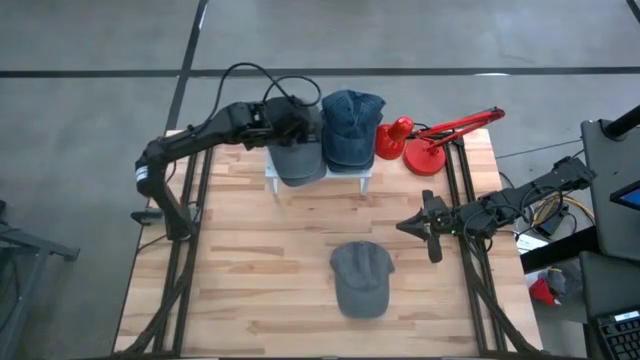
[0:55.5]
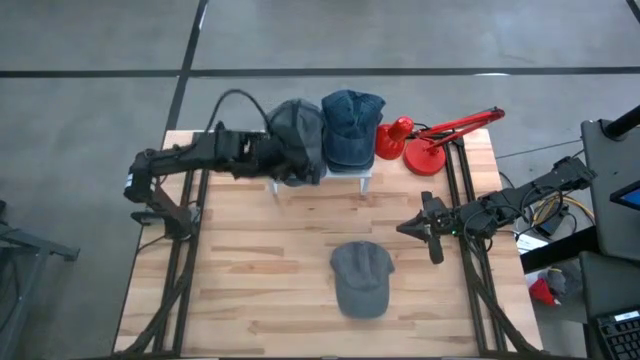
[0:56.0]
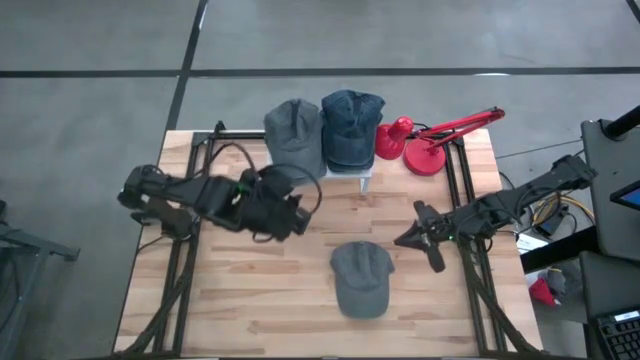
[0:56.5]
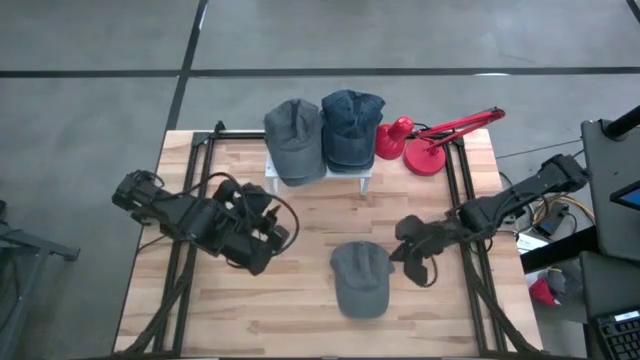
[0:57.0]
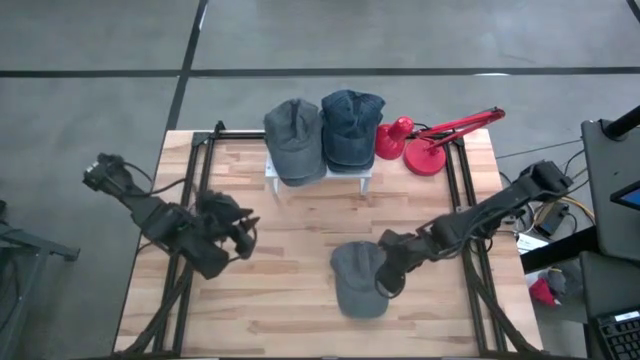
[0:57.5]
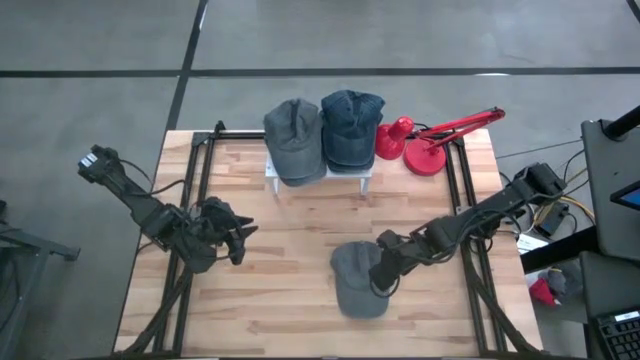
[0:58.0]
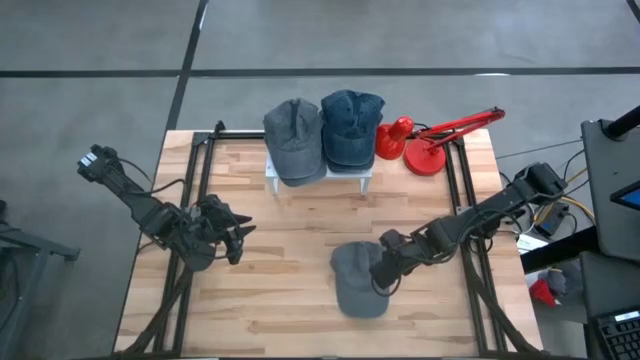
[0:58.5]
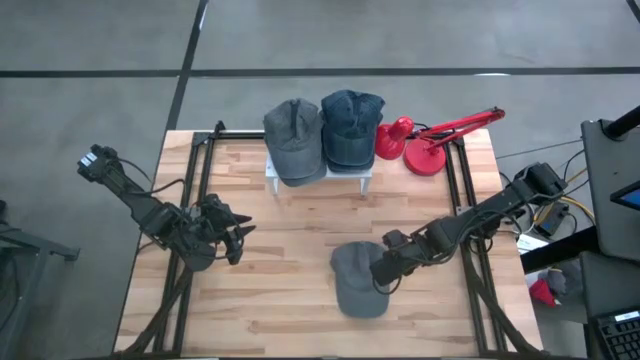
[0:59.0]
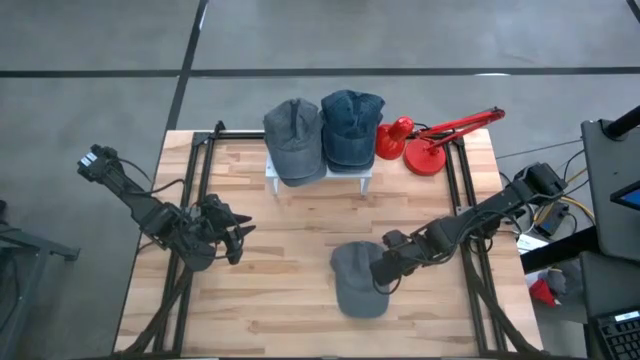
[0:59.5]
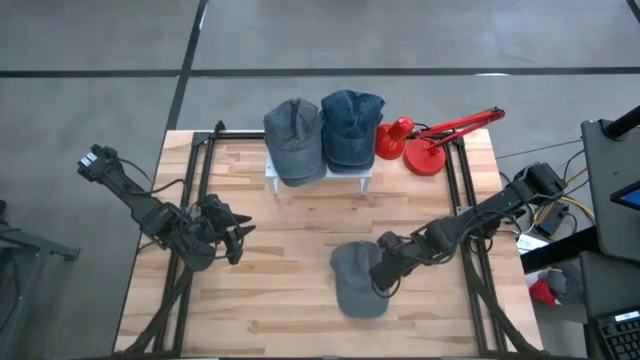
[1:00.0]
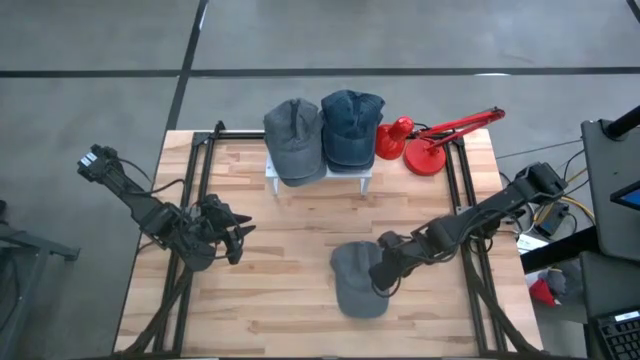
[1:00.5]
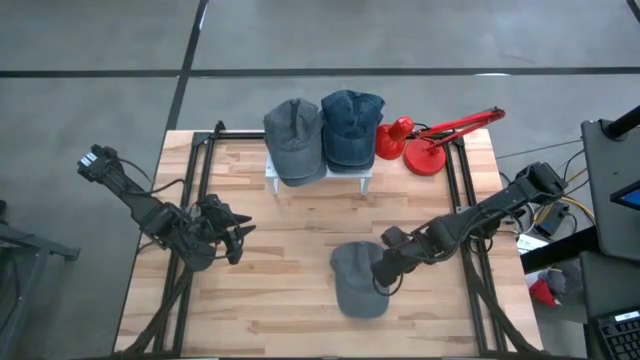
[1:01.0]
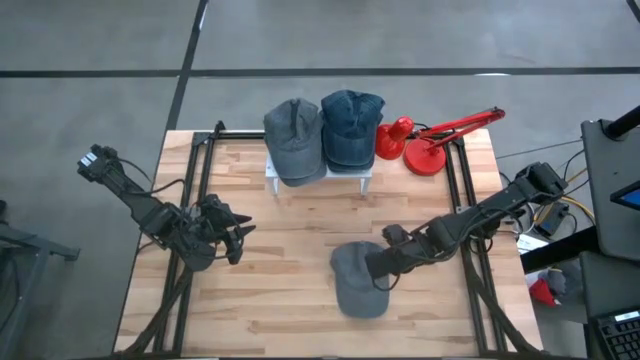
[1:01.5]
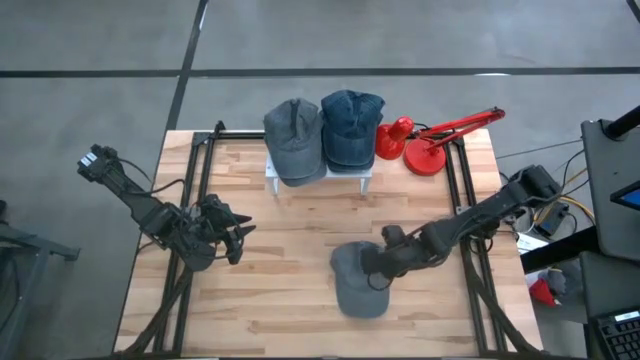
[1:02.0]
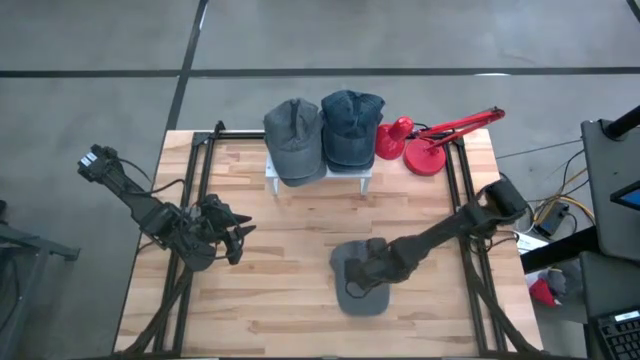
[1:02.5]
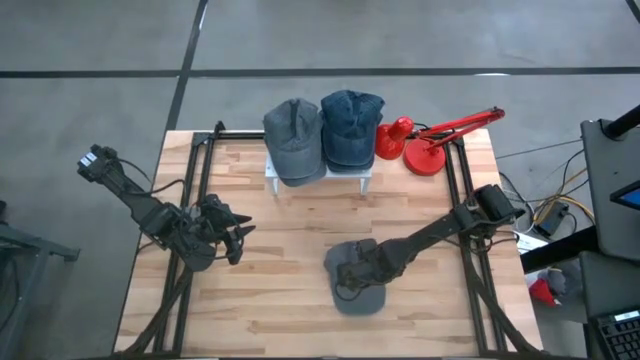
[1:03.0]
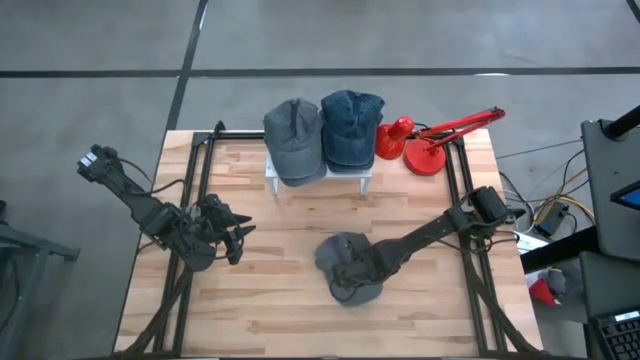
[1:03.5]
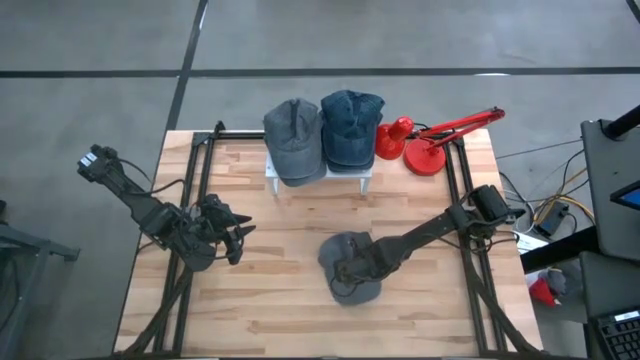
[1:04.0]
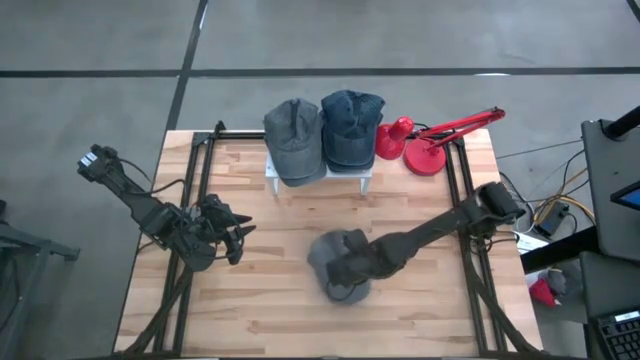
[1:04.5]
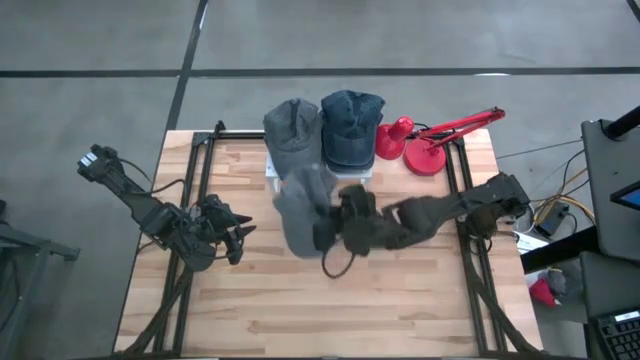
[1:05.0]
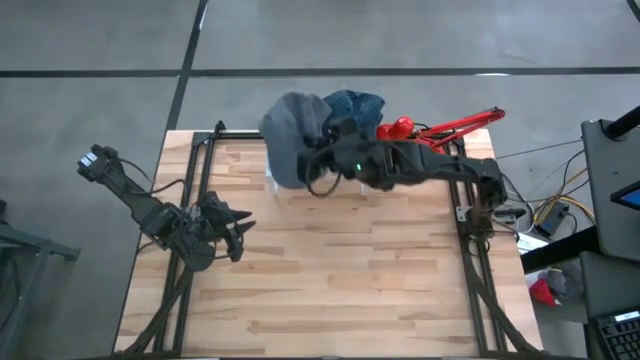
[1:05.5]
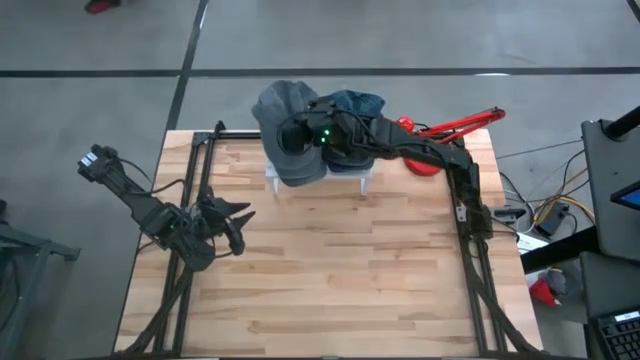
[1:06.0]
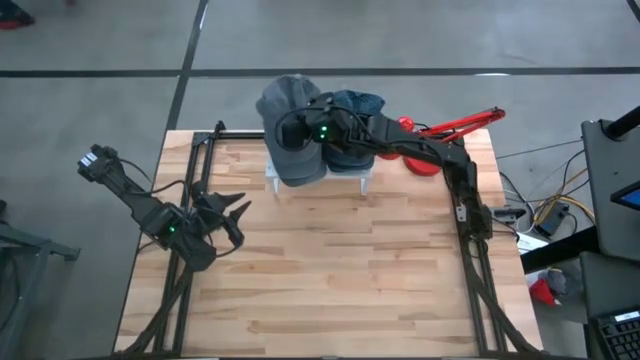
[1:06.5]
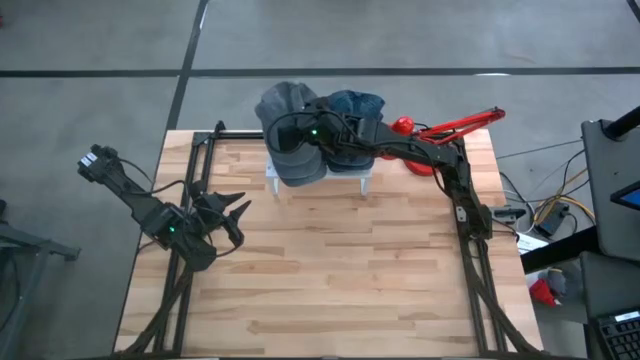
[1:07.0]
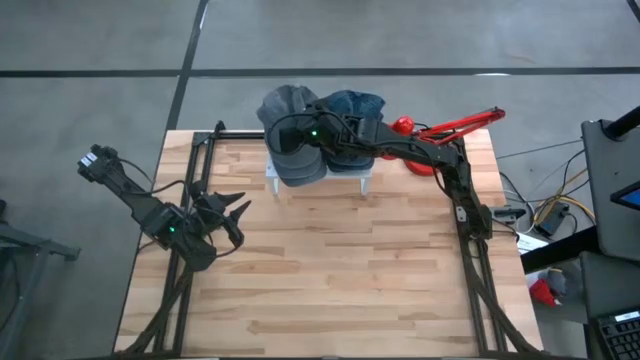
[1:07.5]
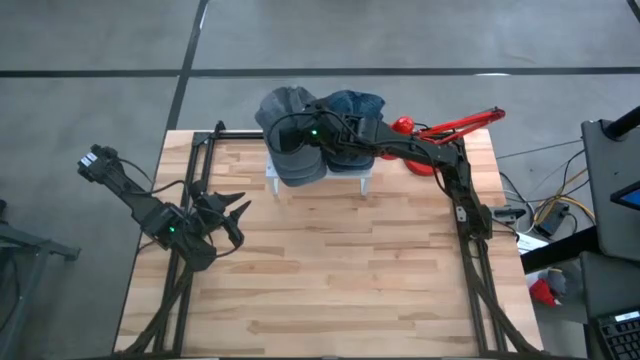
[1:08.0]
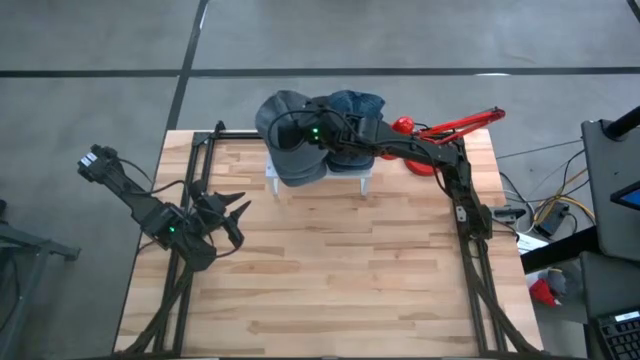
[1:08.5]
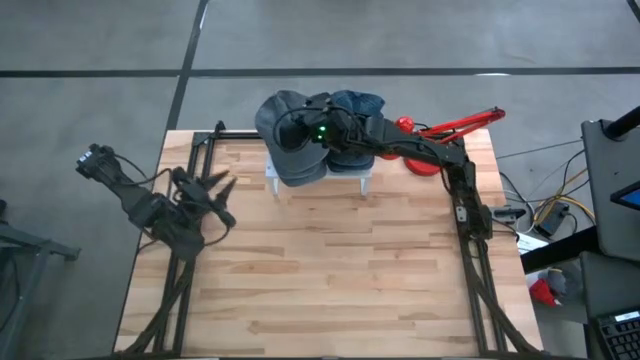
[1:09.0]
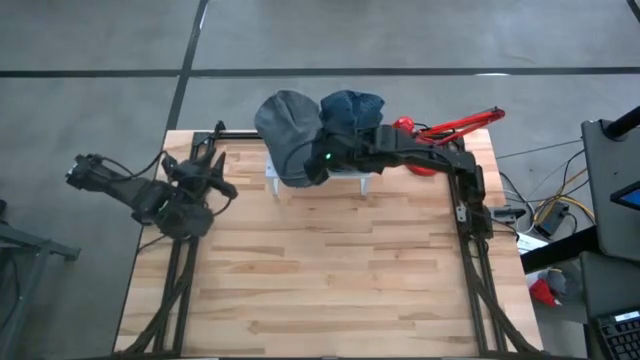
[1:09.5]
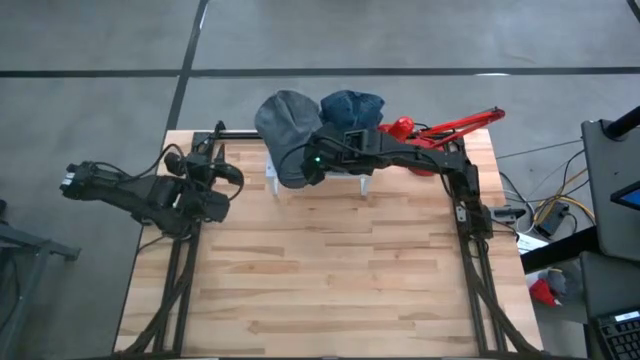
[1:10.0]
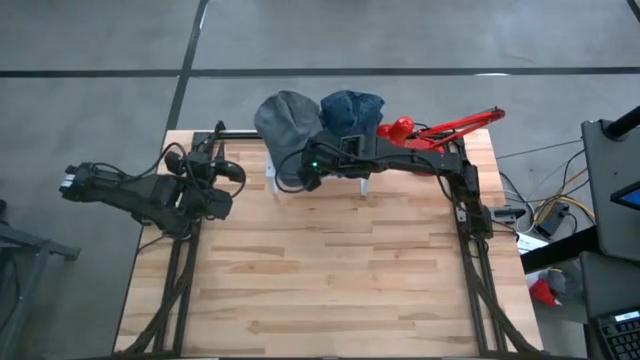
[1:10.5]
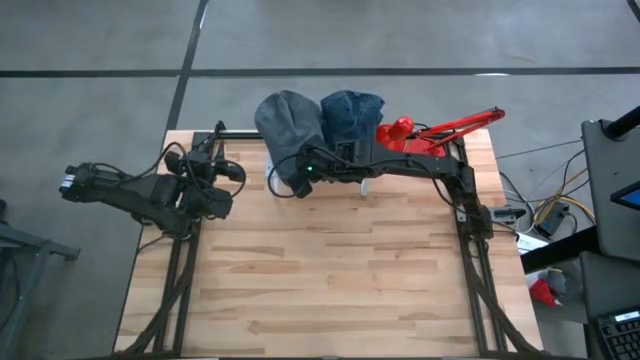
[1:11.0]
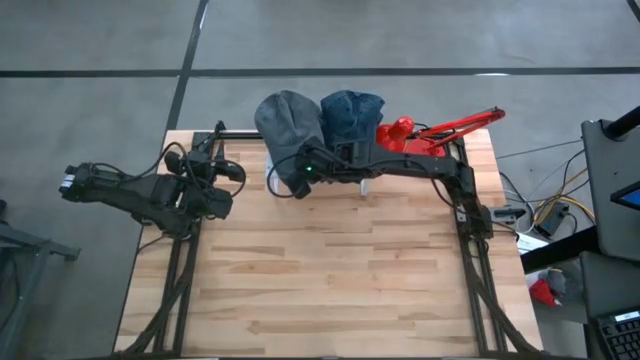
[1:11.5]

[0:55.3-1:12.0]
Task: Pick & Place hat
Stack the gray cap on the stacked gray caps on the shelf

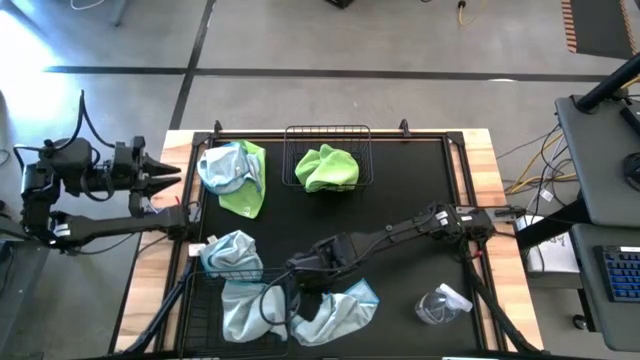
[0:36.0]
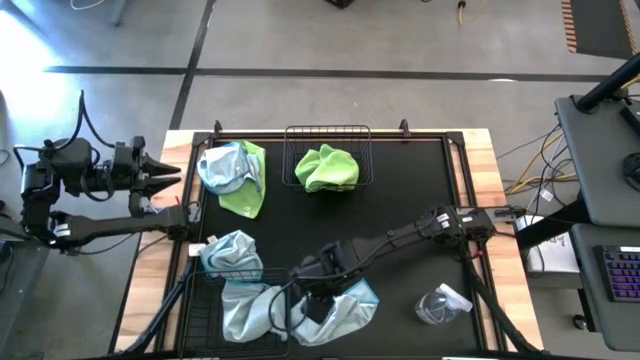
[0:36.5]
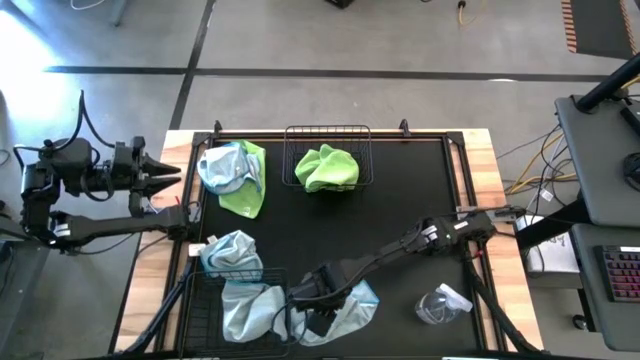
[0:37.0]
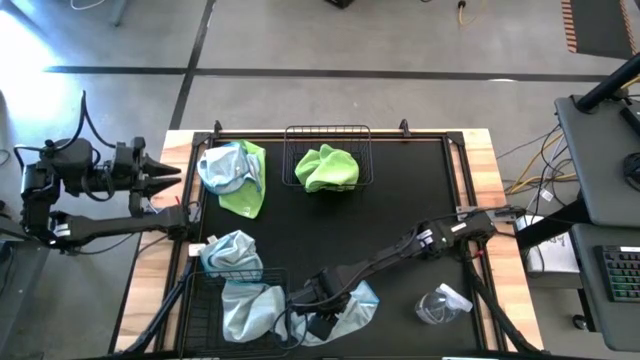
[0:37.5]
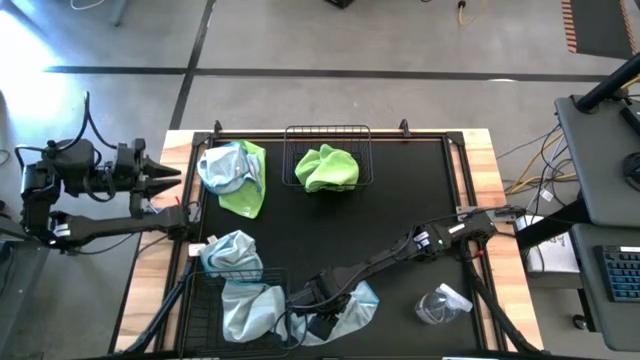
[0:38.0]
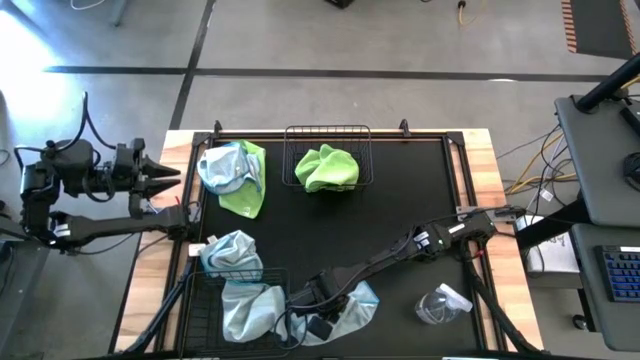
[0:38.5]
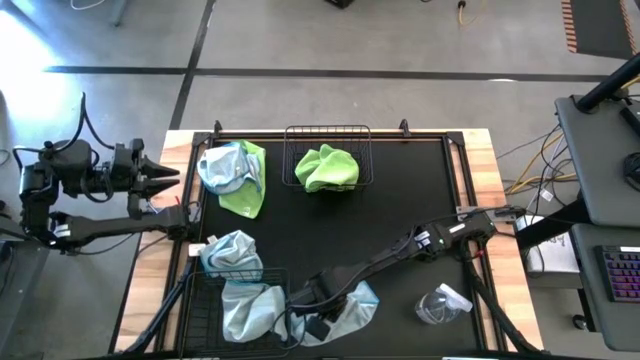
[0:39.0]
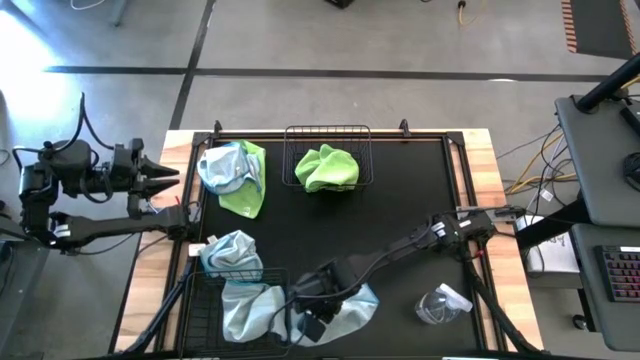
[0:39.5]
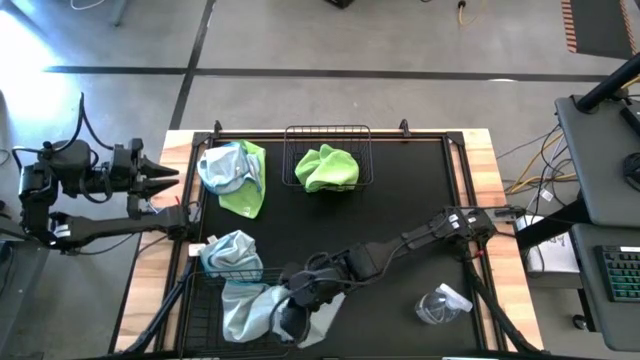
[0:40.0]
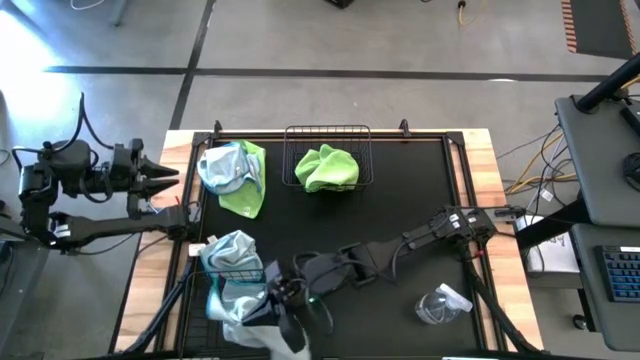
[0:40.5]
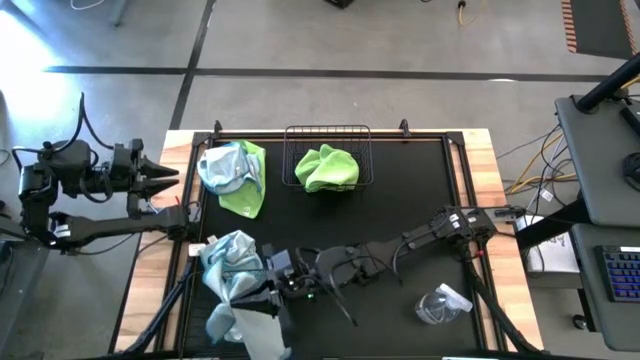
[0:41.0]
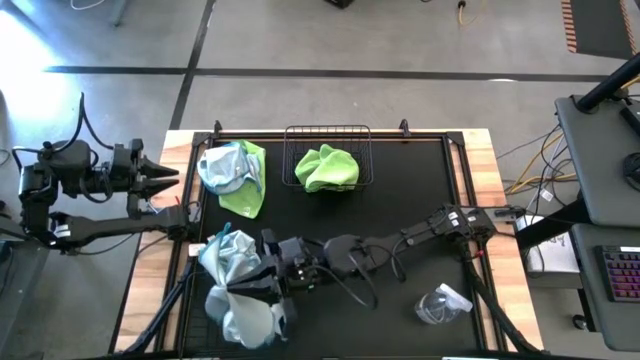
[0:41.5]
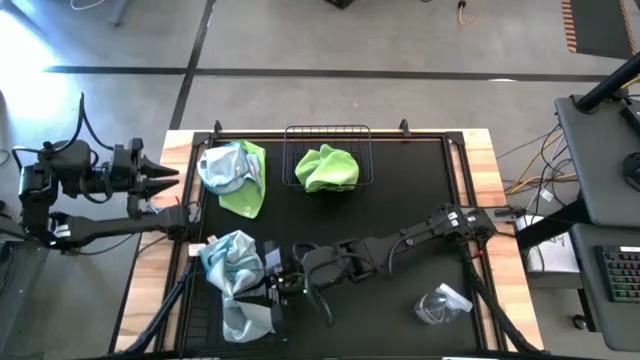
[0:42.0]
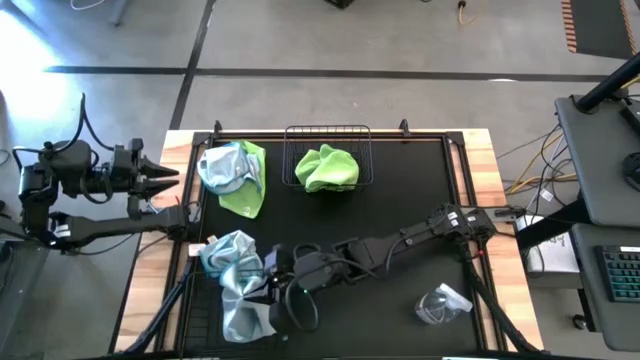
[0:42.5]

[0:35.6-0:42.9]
Task: Sort microfiber towel by color & place in baskets
Put the blue microfiber towel into the bottom black wire basket
